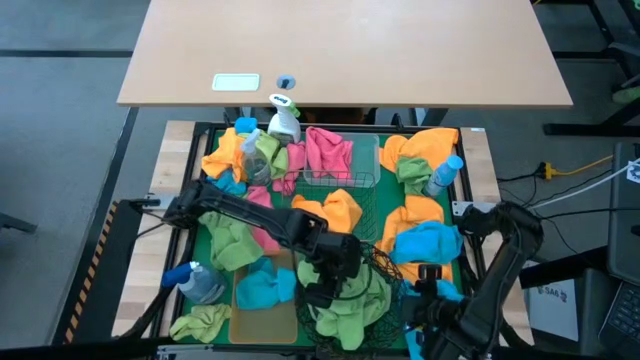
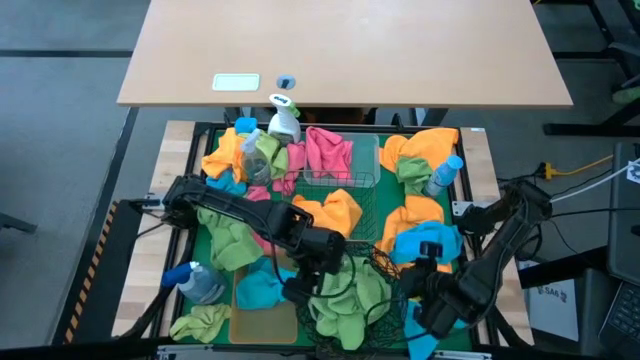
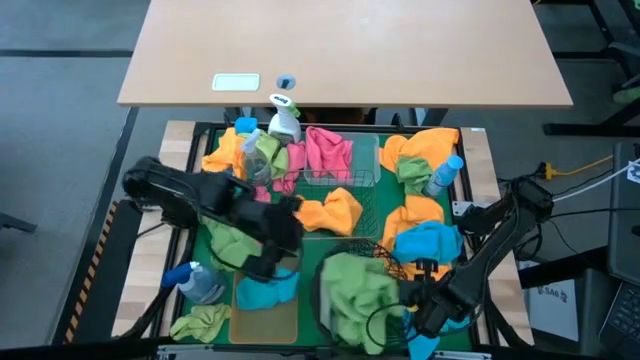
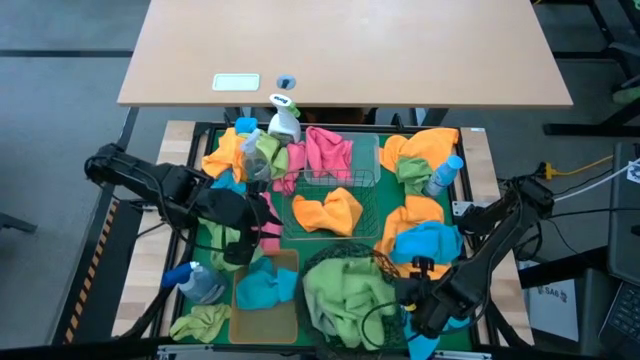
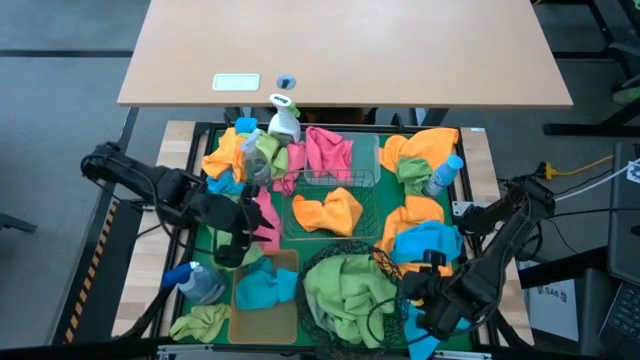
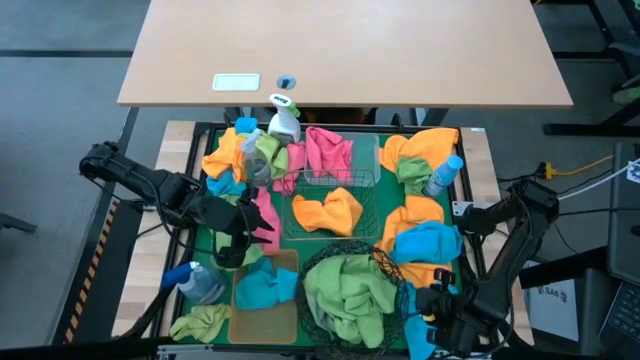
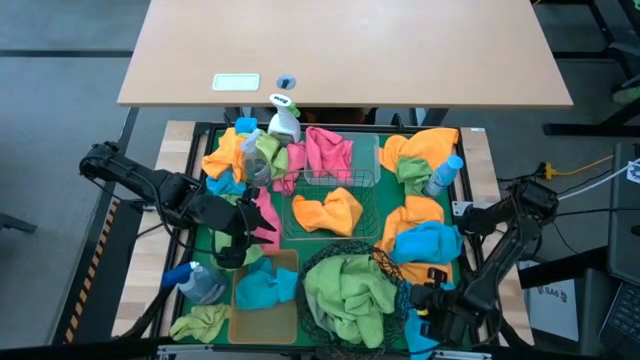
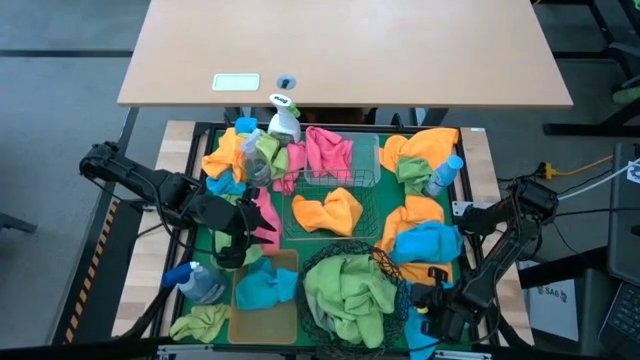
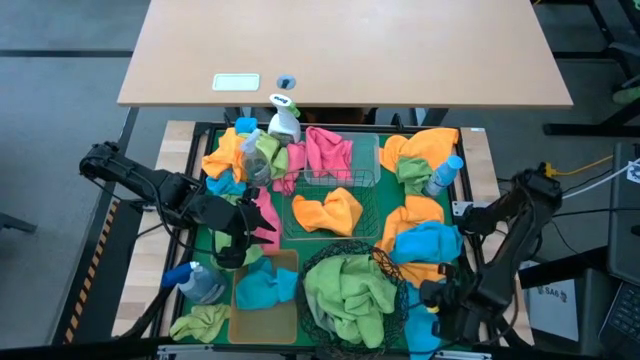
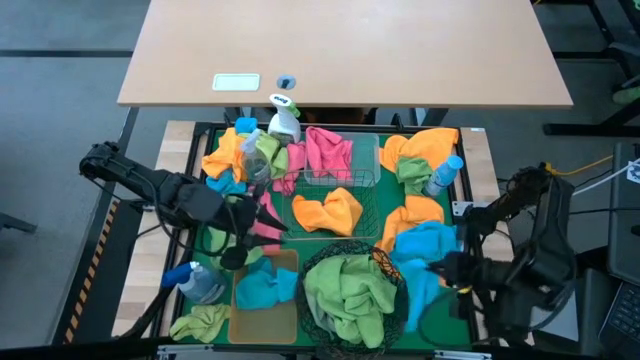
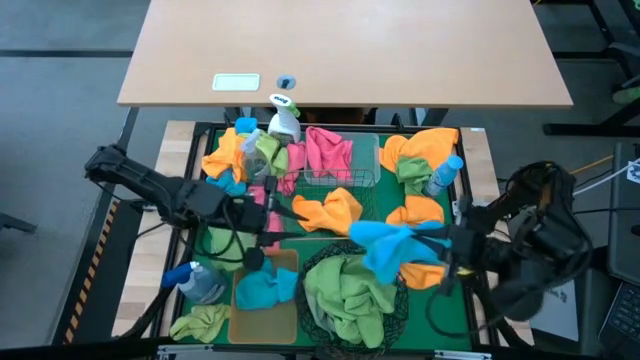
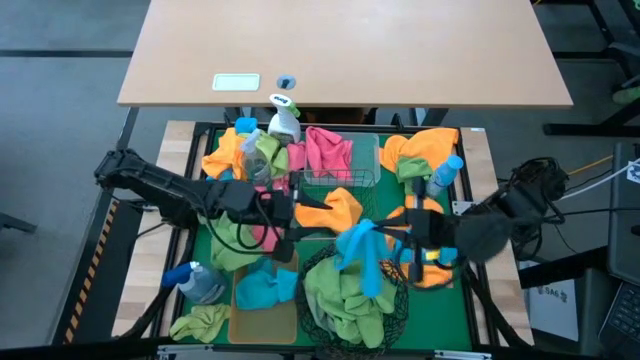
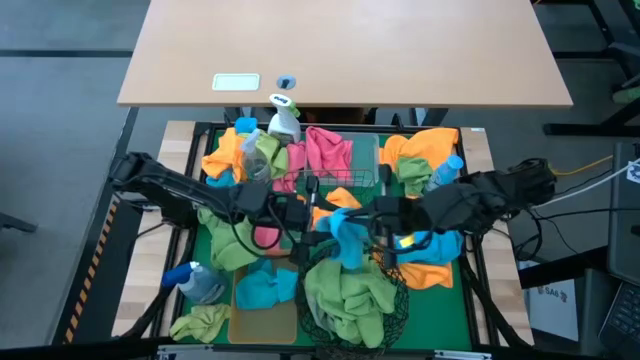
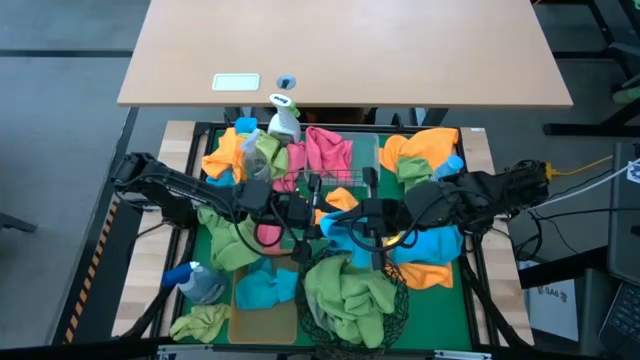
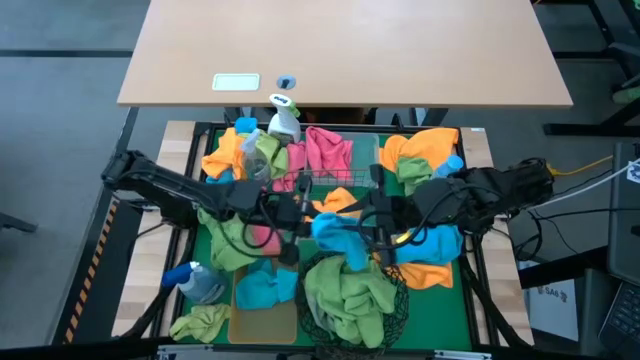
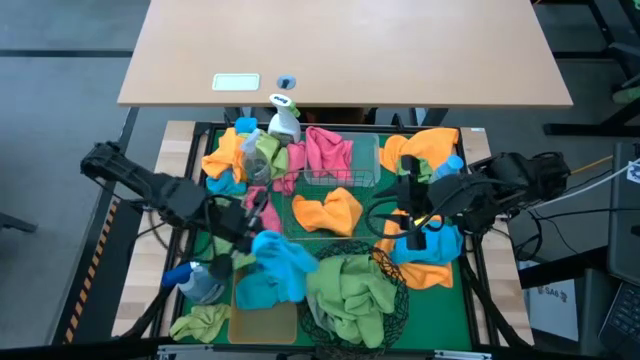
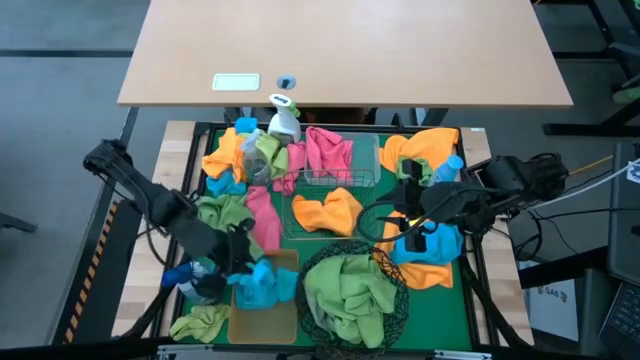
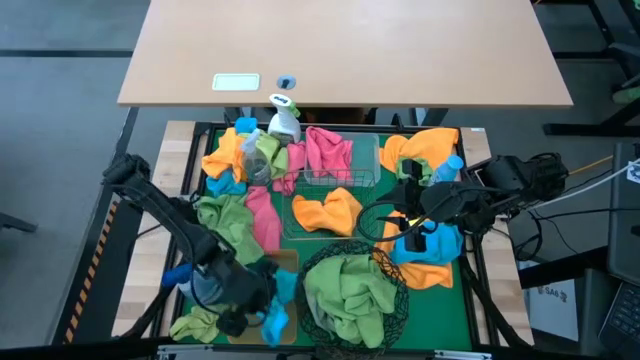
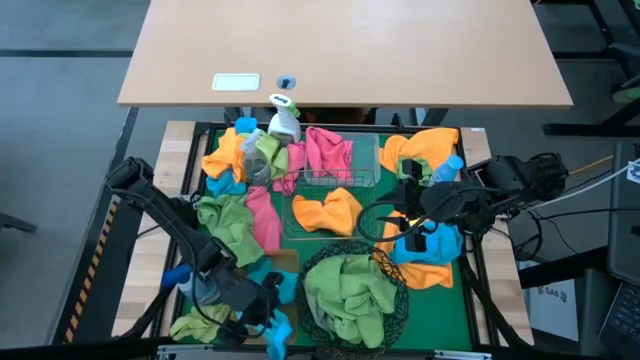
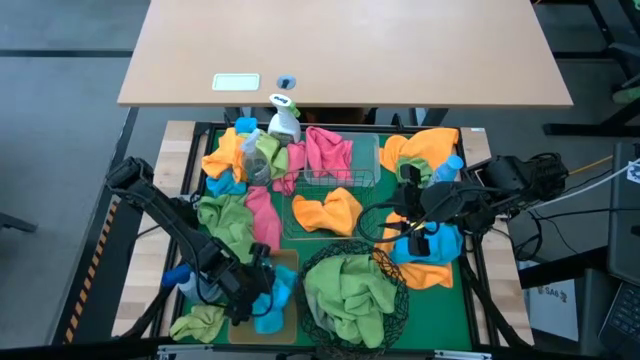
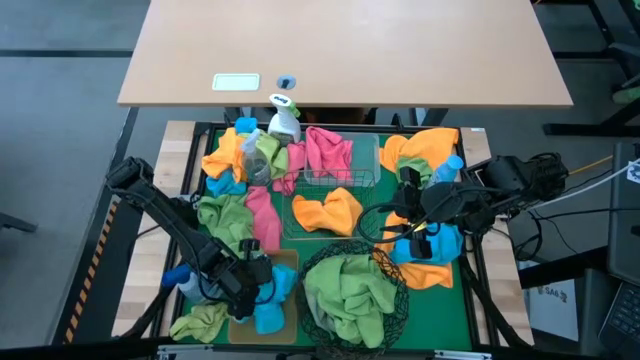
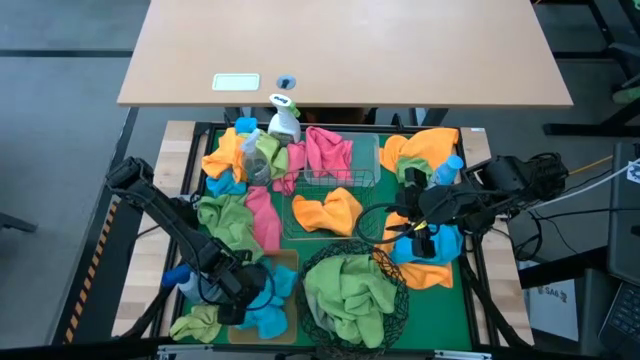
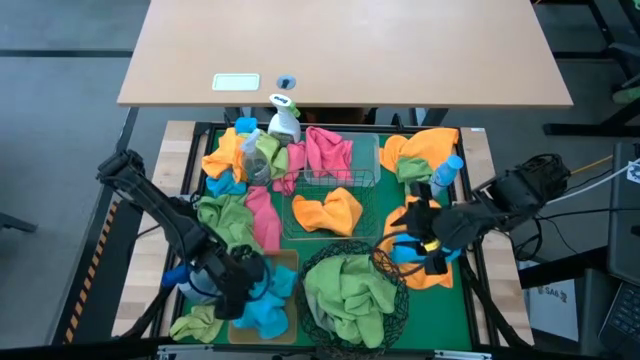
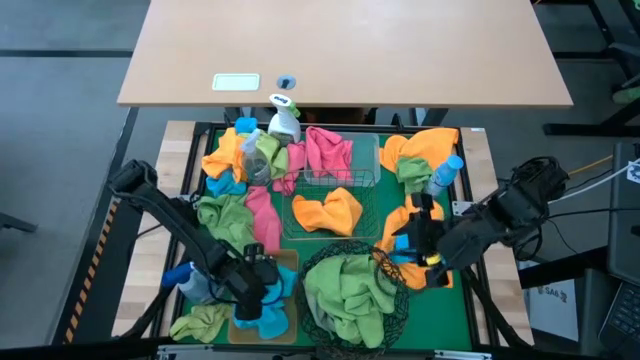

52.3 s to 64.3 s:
Task: Sort microfiber towel by color & place in baskets
Put the blue microfiber towel into the orange bin

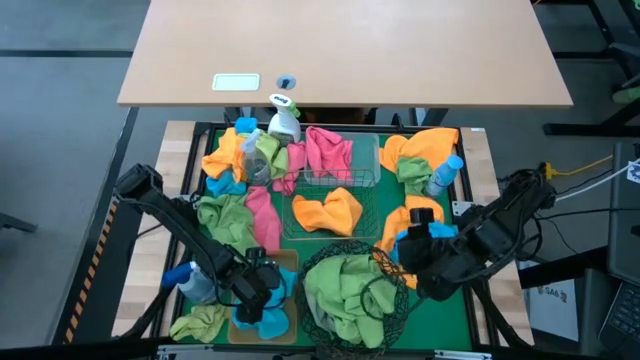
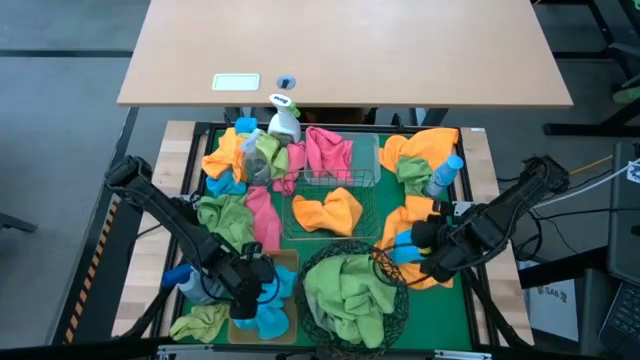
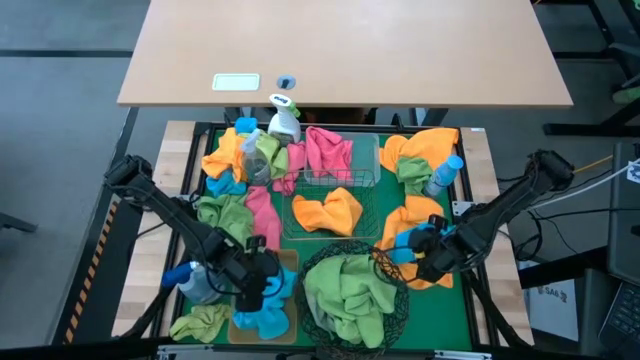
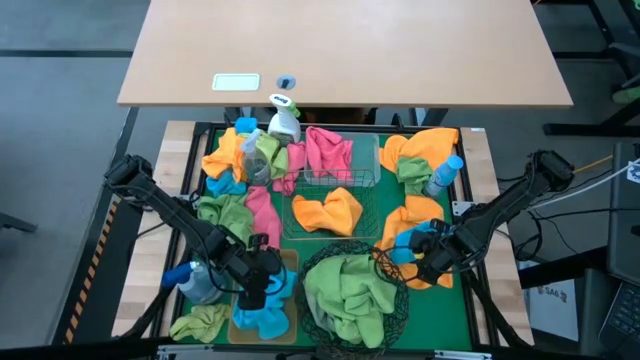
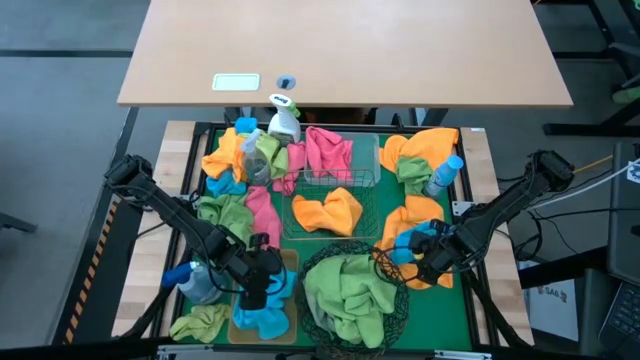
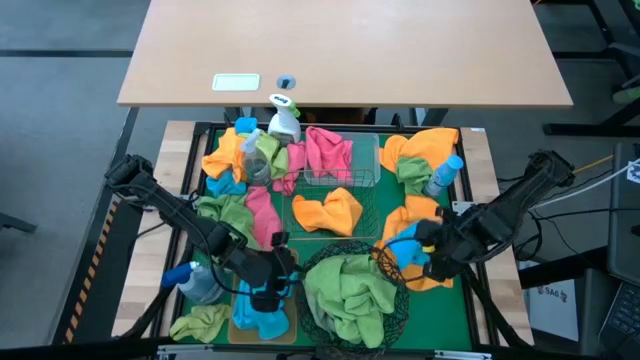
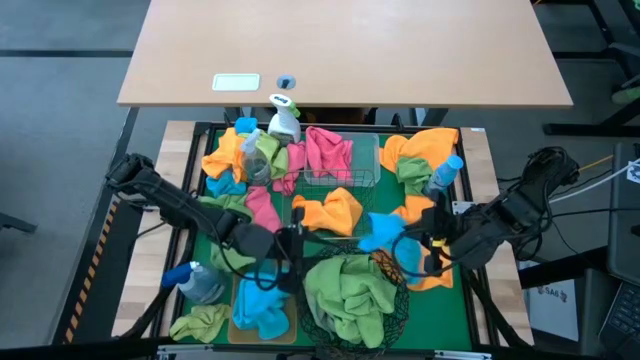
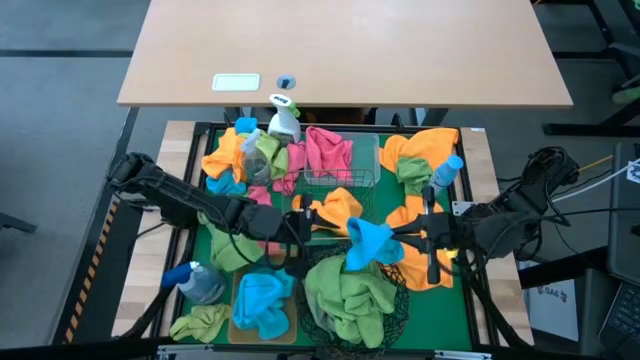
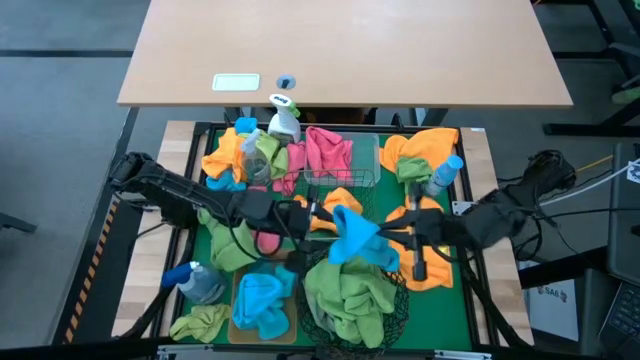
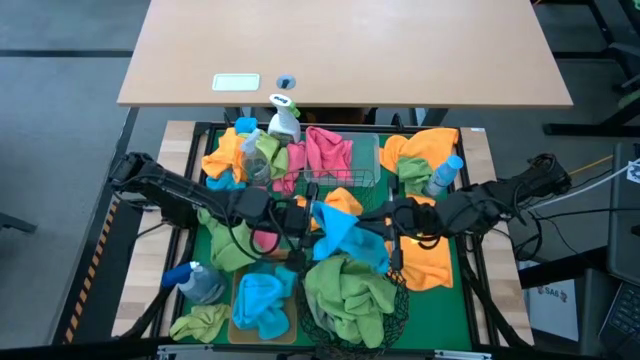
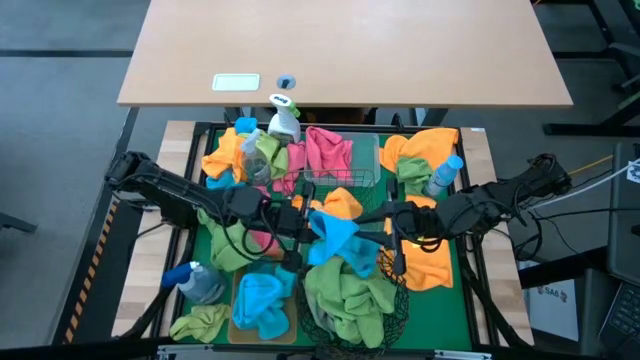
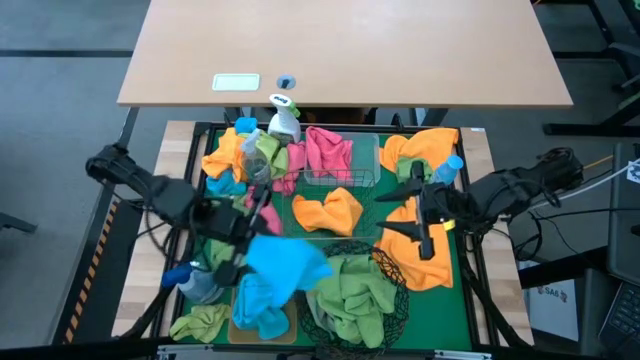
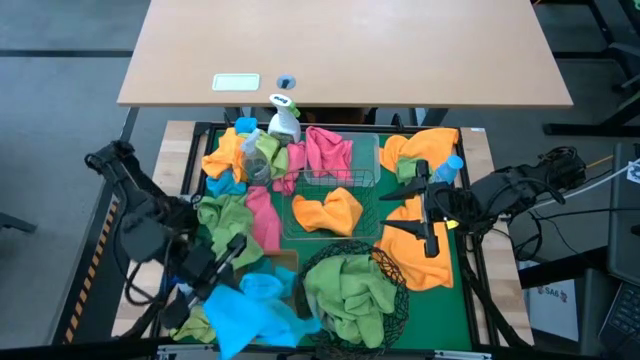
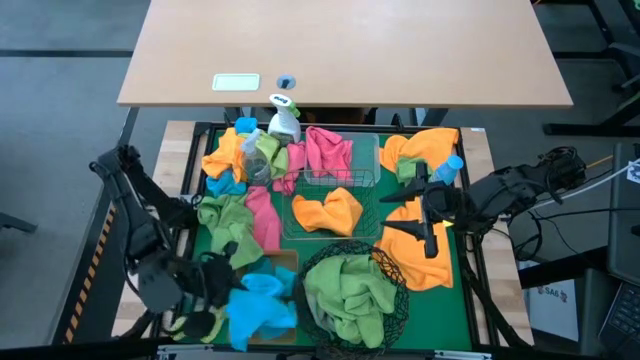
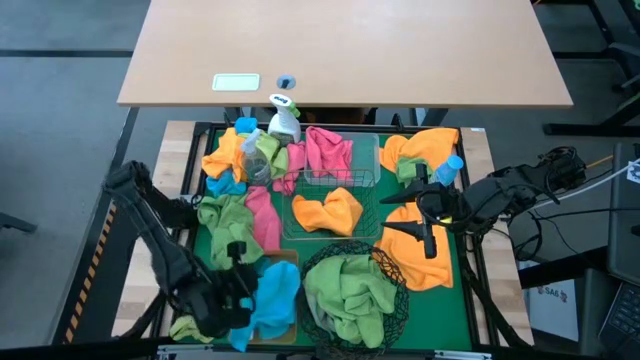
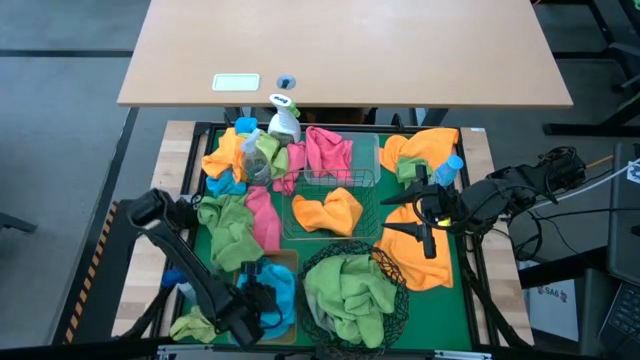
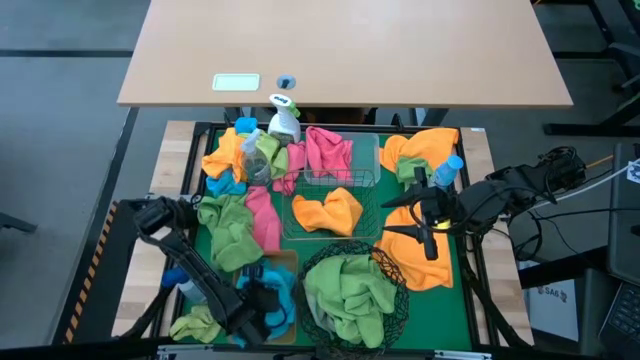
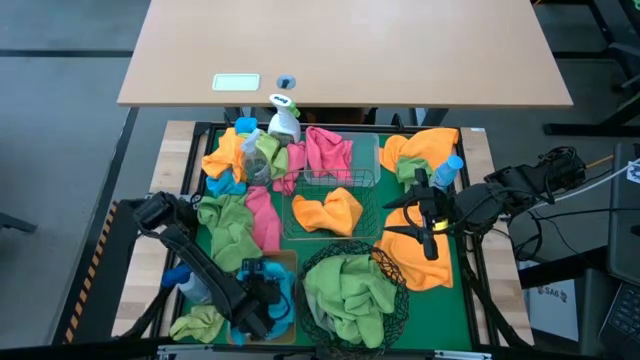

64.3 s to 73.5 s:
Put the blue microfiber towel into the orange bin

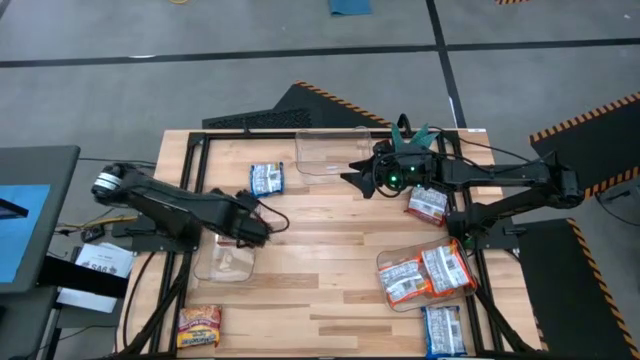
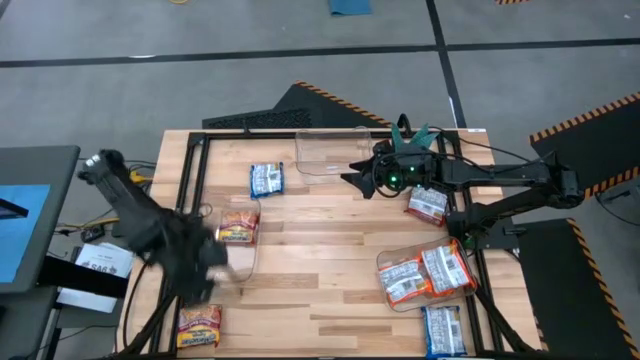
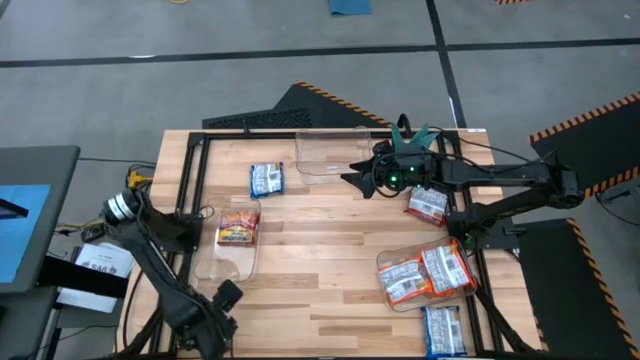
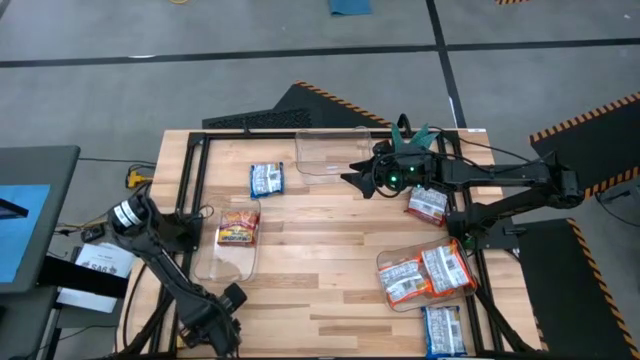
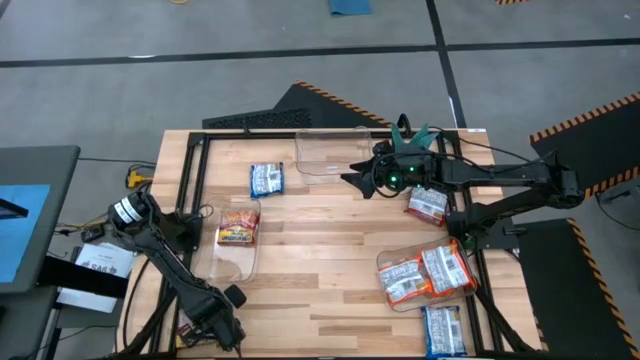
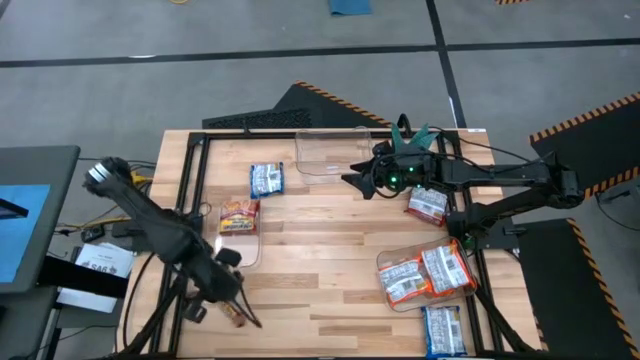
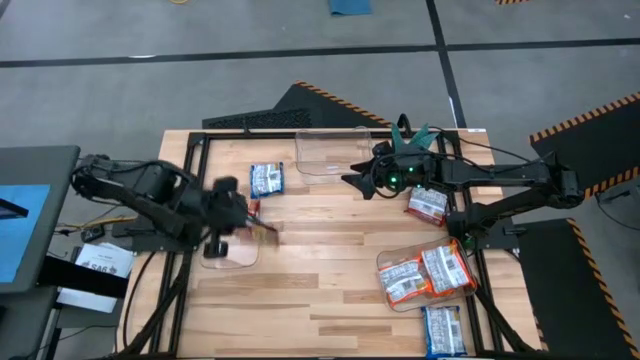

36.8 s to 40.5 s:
Task: Sort Maruchan noodles
Put the bottom red noodle pack into the bottom left transparent bin
